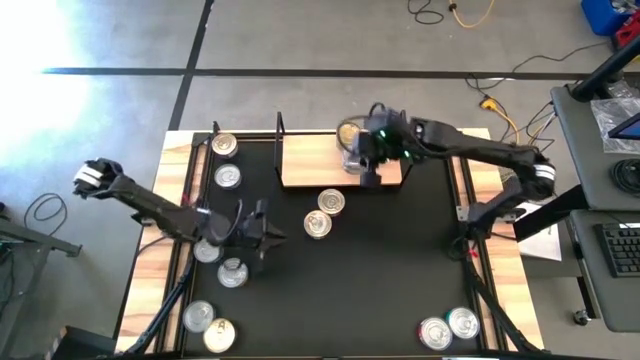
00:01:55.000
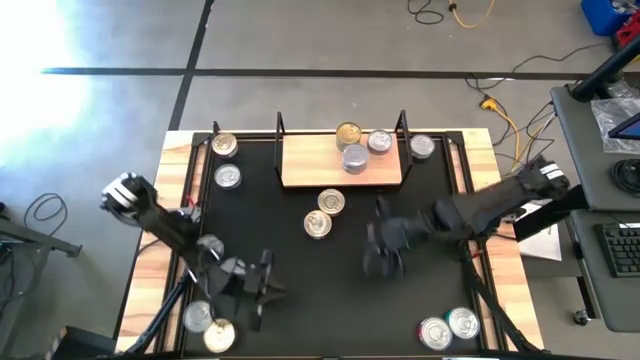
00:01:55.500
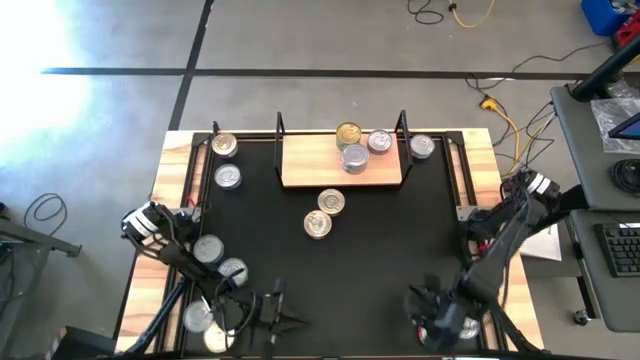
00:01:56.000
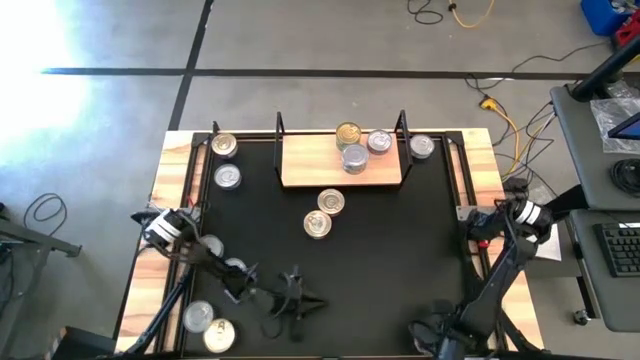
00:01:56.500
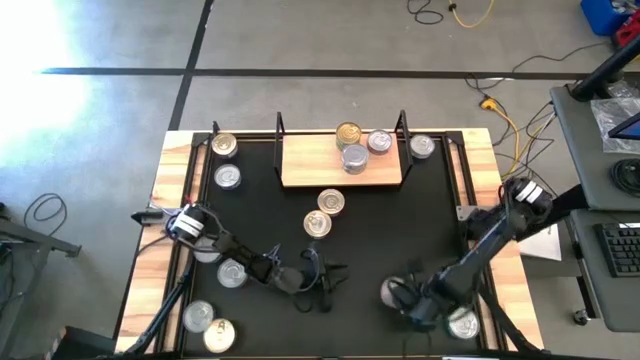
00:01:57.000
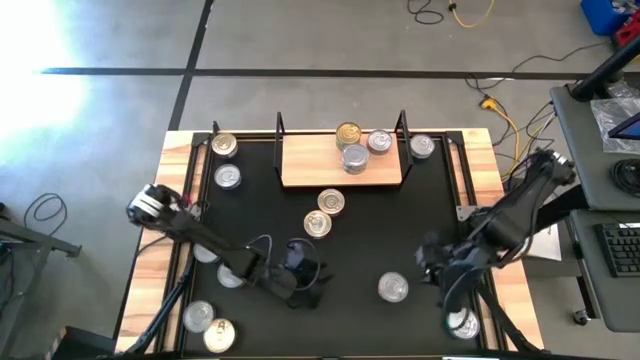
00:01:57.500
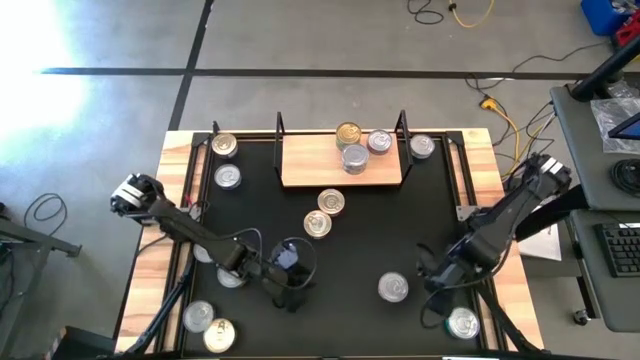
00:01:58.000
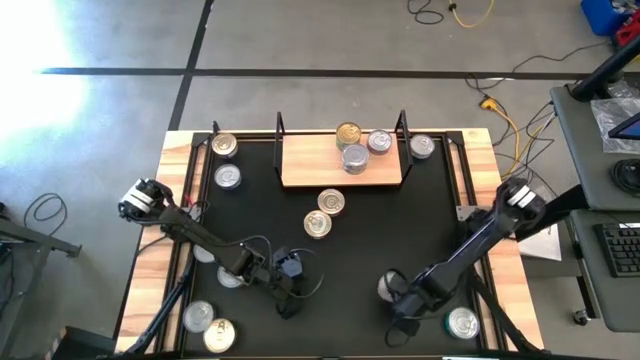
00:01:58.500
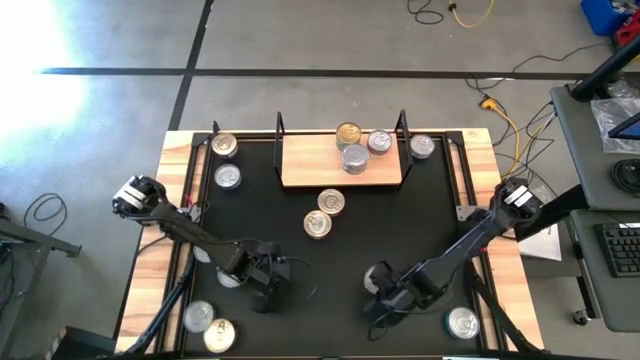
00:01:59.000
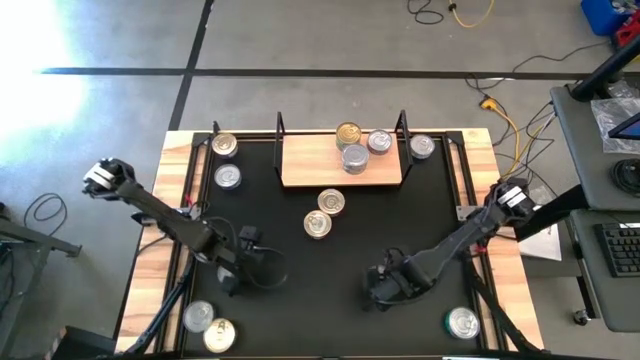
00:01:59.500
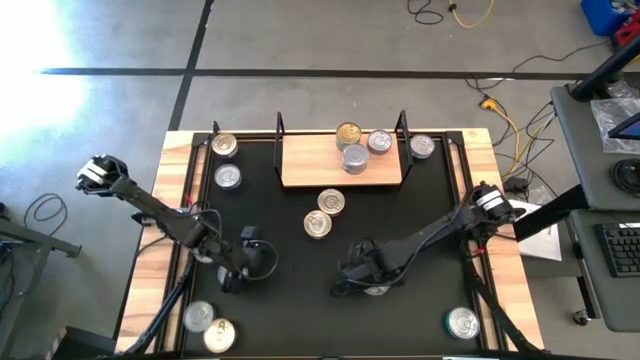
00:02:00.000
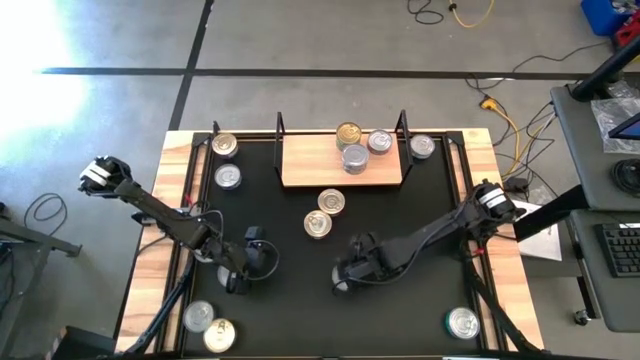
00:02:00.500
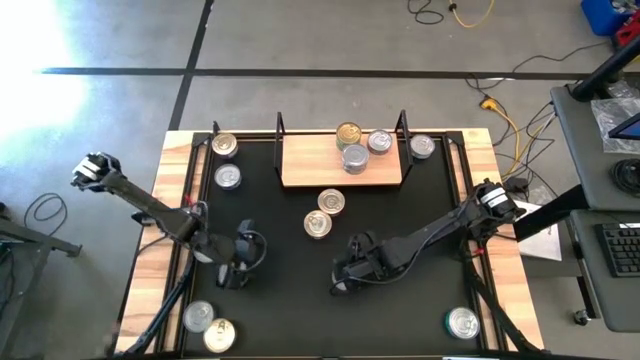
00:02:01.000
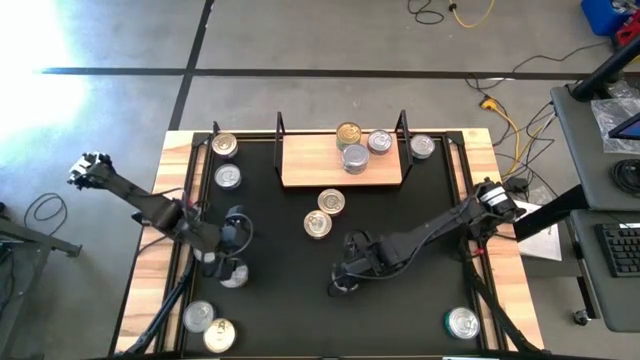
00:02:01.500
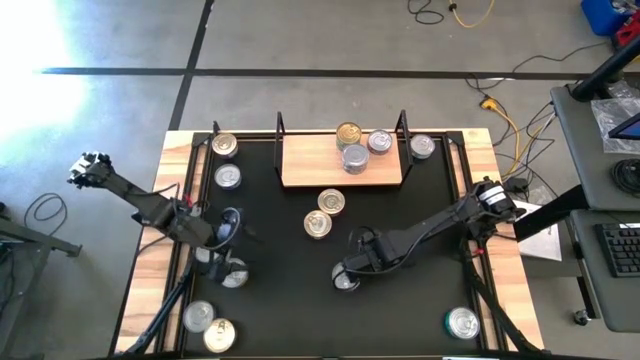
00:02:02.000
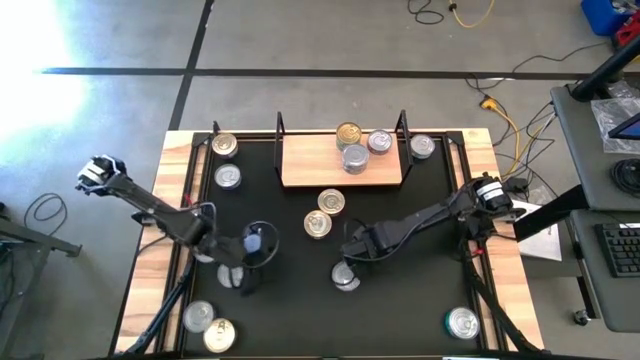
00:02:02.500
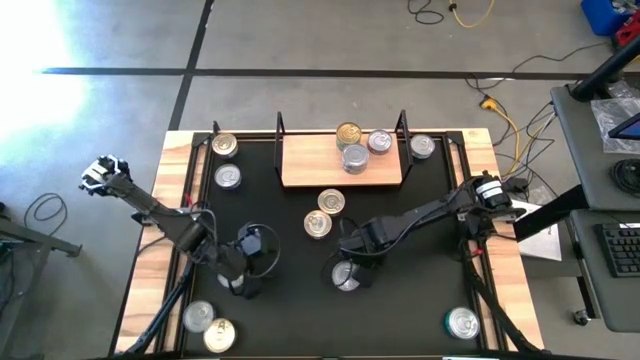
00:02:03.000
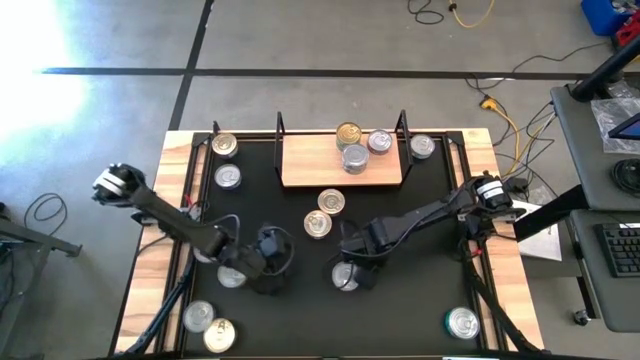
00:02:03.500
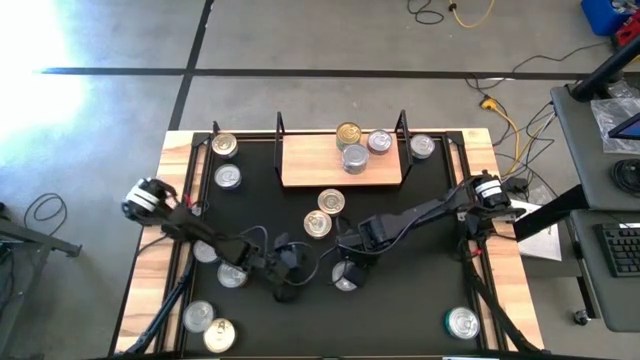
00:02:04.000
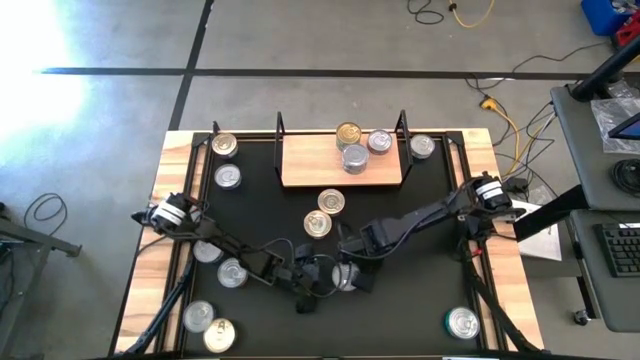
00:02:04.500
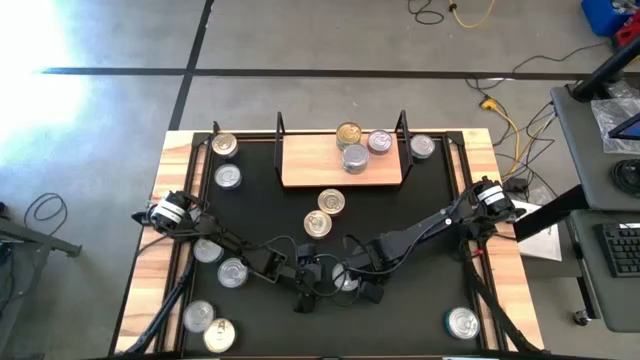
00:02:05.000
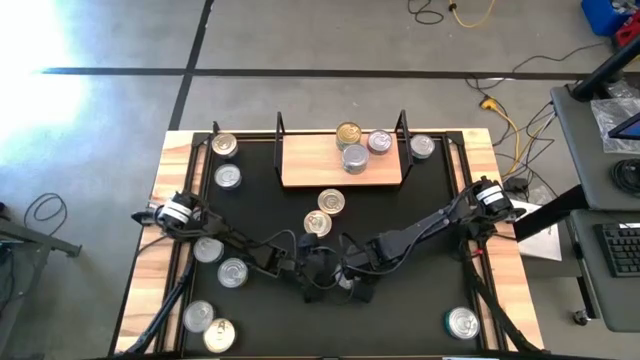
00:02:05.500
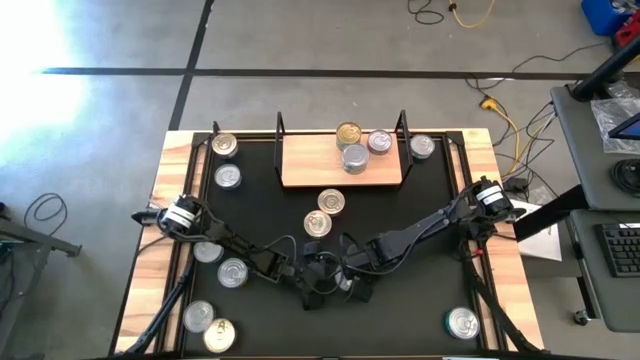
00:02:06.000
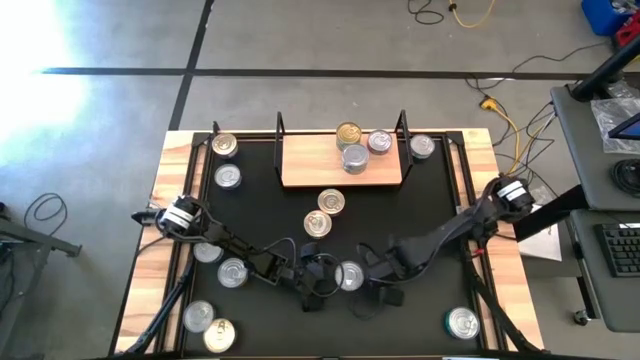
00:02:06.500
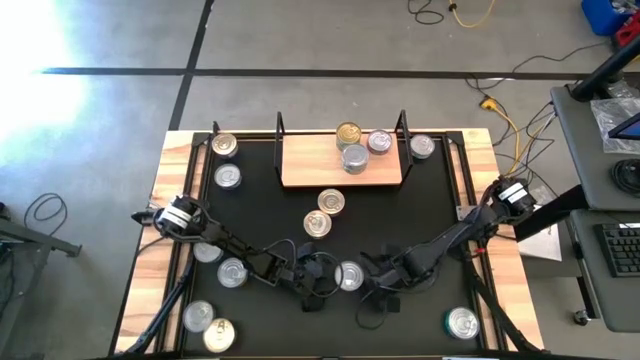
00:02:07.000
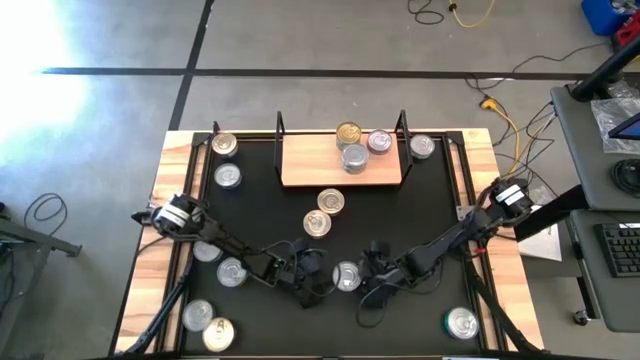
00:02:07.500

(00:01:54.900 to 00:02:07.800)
Task: Stack canned seafood by type on shelf
Stack the red tuna can on top of the other red tuna can on the shelf

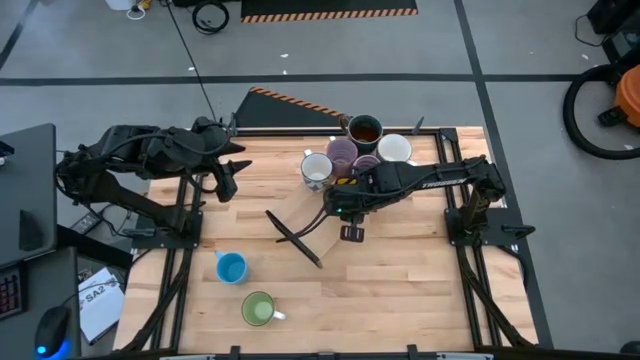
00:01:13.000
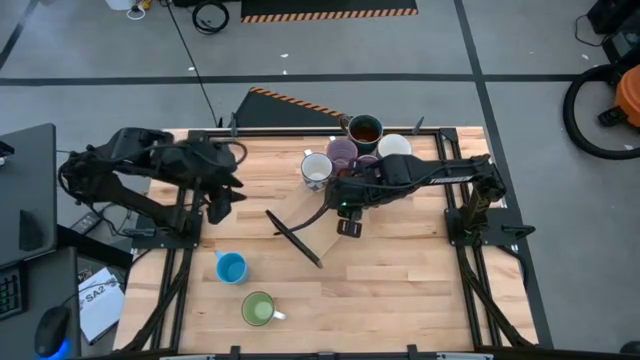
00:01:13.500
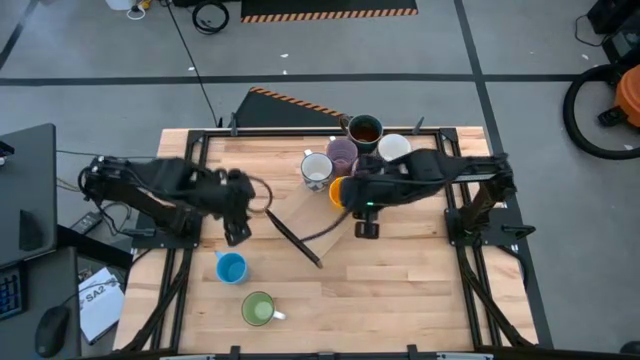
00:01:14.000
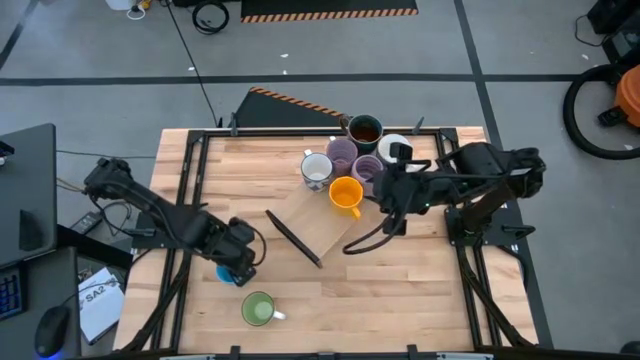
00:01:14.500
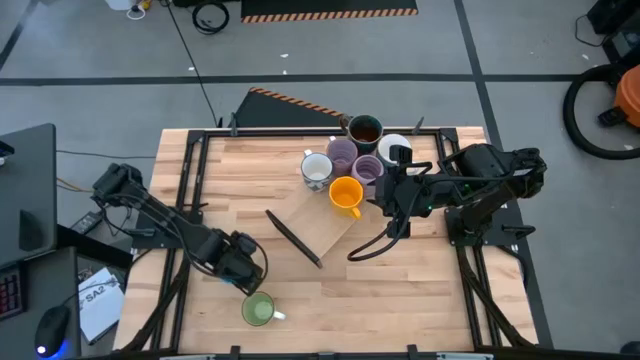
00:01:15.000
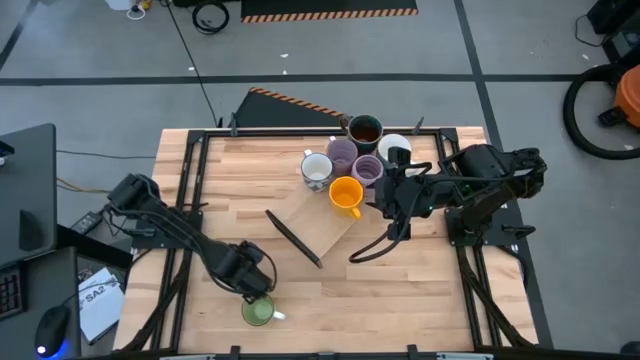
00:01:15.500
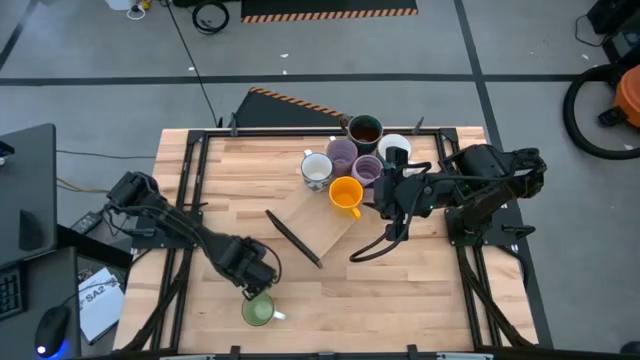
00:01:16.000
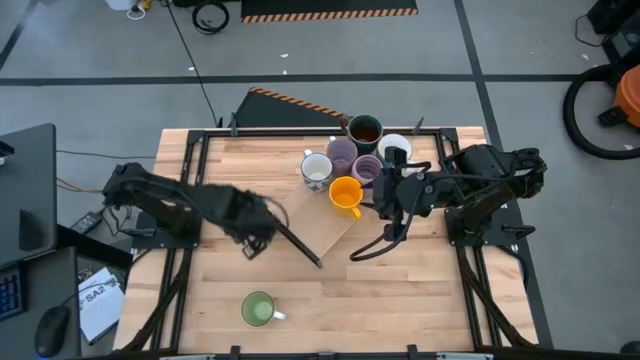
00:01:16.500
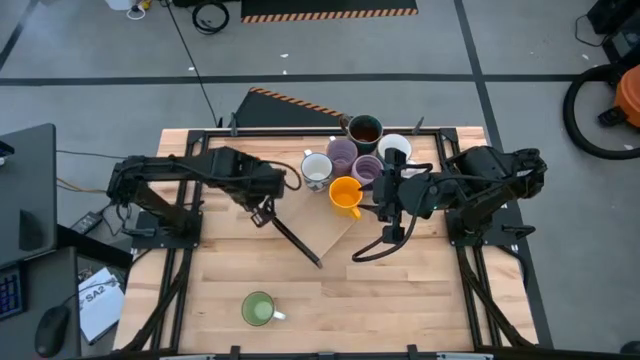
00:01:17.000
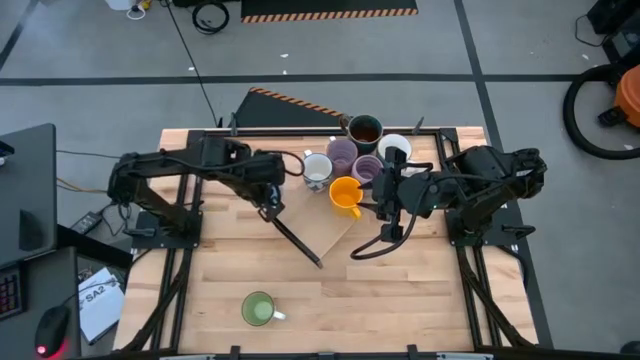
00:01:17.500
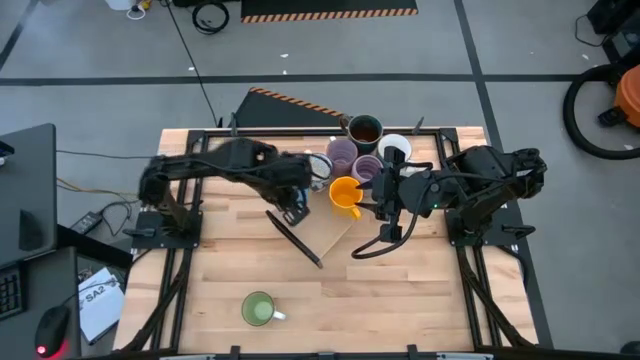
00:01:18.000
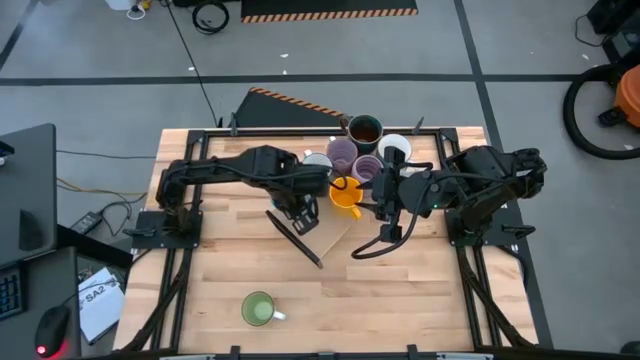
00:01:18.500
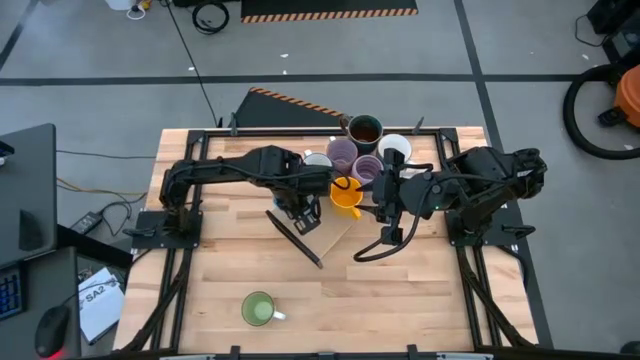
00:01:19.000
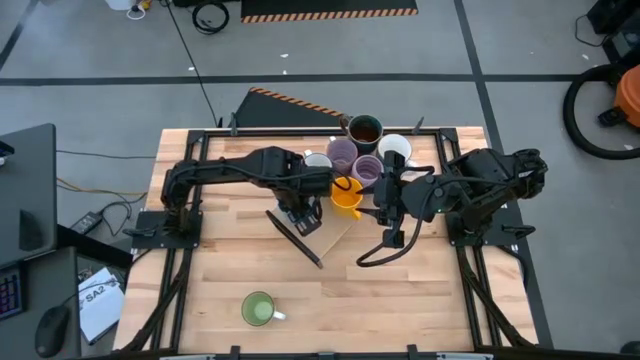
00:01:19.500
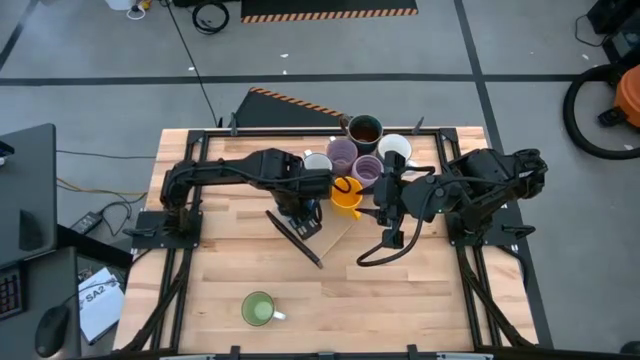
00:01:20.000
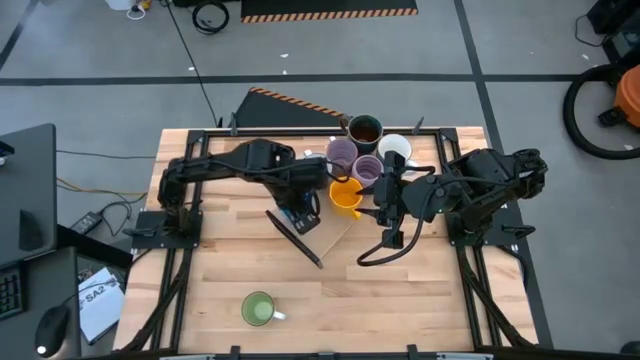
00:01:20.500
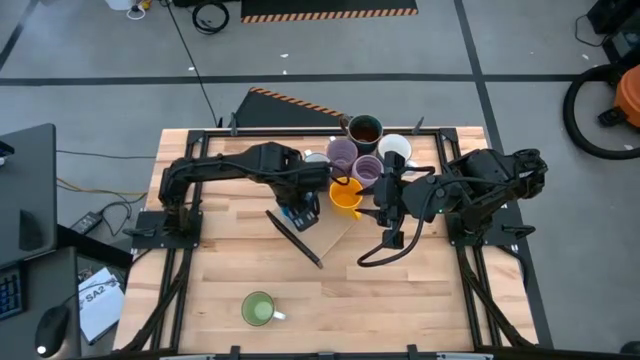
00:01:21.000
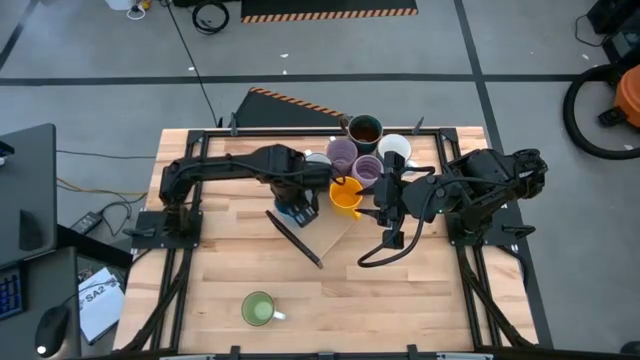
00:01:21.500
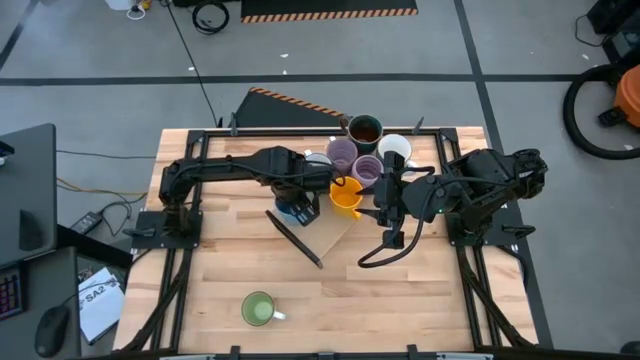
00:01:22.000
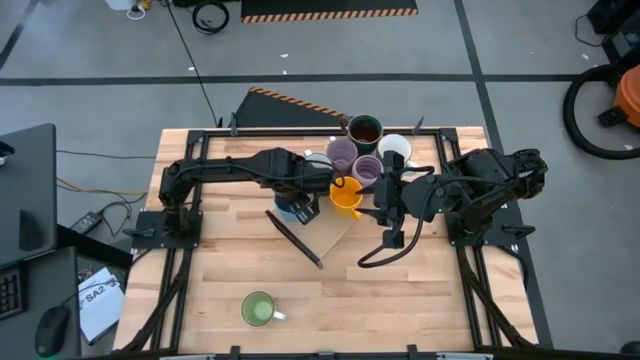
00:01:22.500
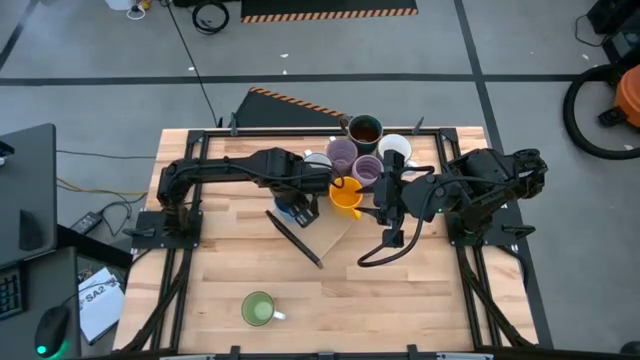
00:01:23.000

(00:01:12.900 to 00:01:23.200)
Task: Place coffee mugs
Put the blue mug on the shelf
